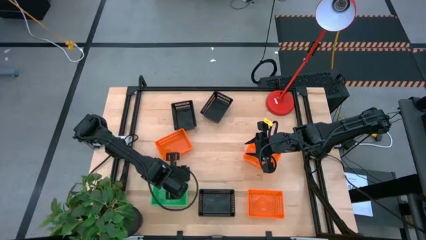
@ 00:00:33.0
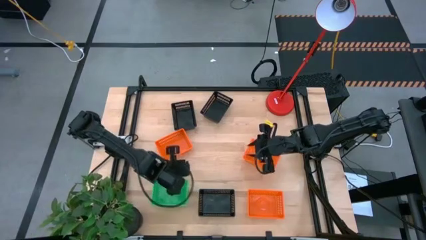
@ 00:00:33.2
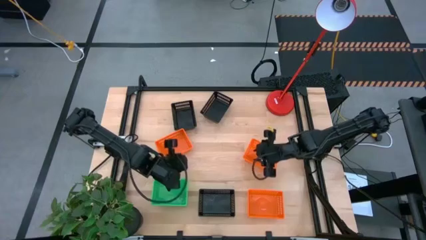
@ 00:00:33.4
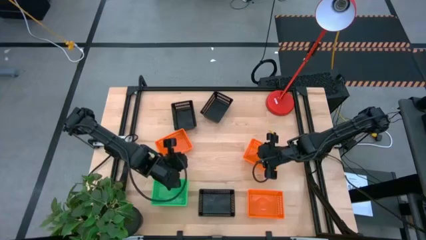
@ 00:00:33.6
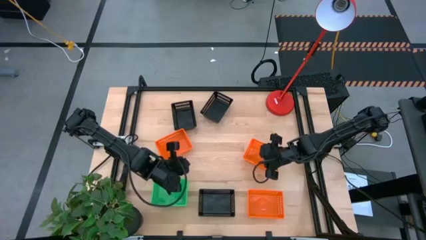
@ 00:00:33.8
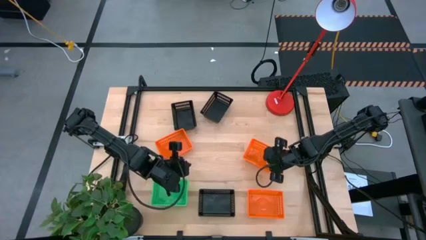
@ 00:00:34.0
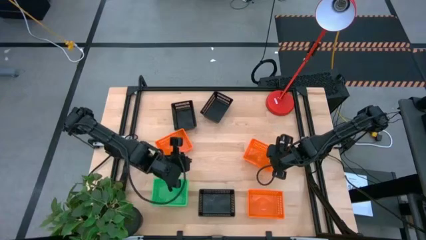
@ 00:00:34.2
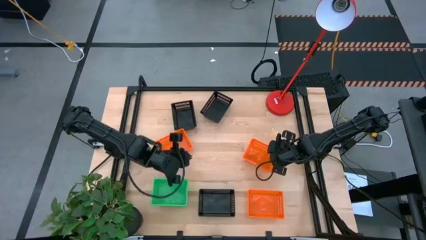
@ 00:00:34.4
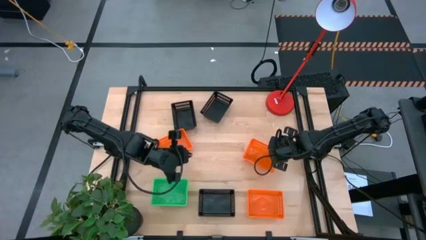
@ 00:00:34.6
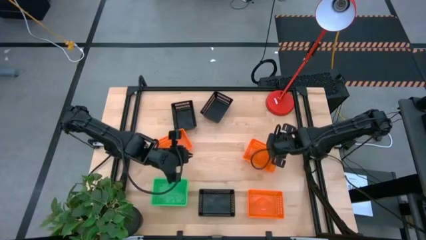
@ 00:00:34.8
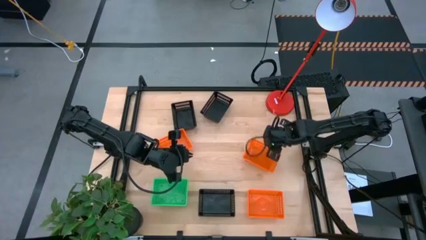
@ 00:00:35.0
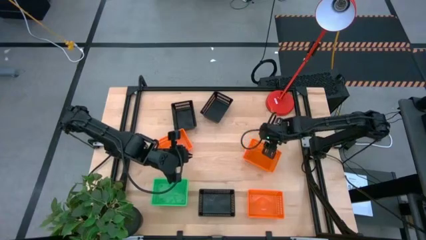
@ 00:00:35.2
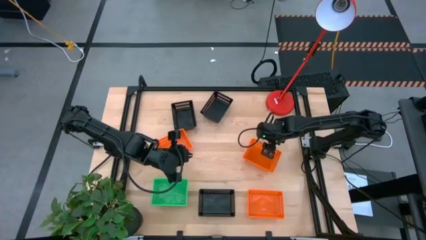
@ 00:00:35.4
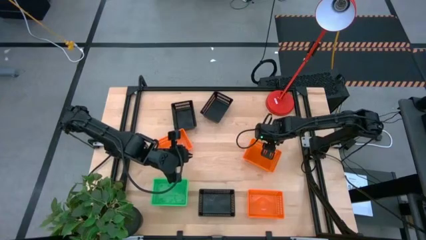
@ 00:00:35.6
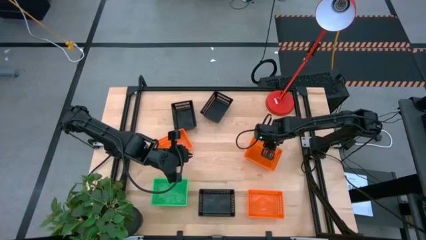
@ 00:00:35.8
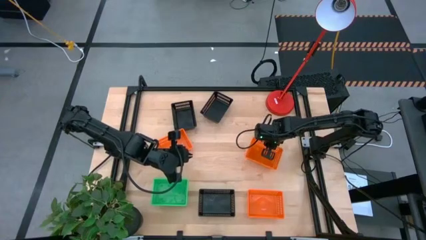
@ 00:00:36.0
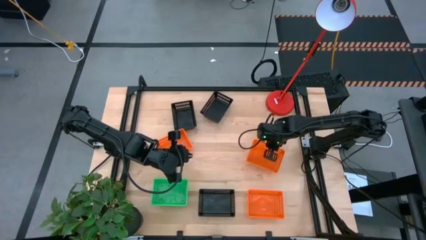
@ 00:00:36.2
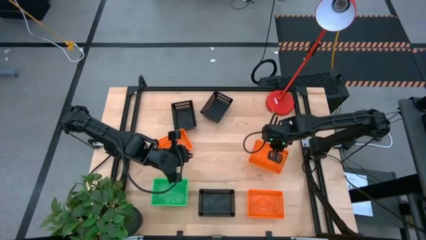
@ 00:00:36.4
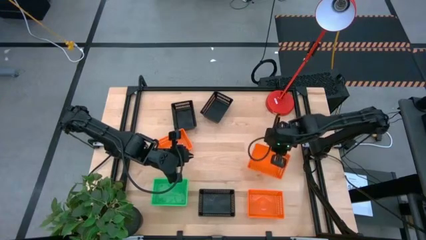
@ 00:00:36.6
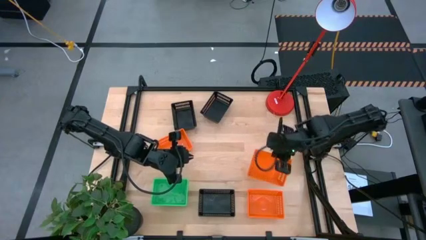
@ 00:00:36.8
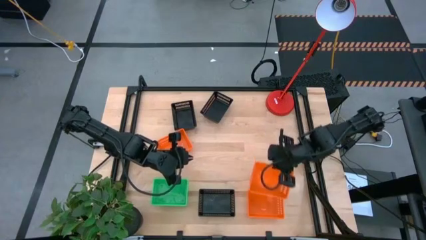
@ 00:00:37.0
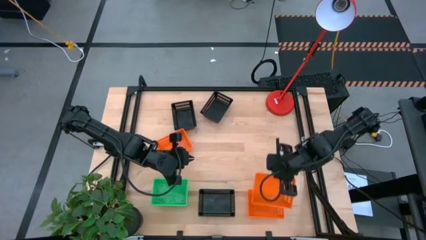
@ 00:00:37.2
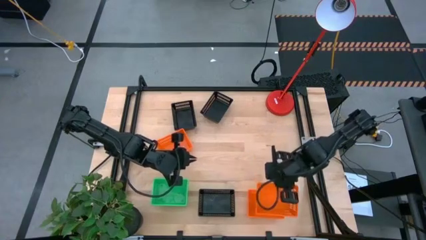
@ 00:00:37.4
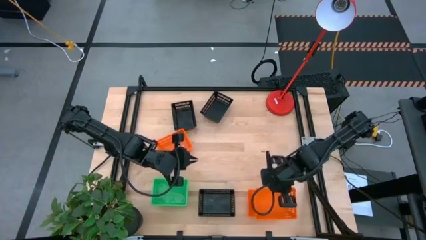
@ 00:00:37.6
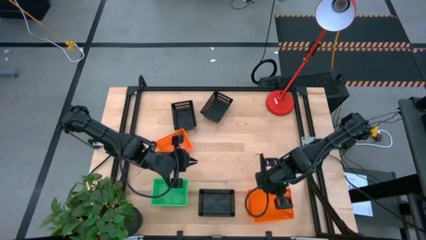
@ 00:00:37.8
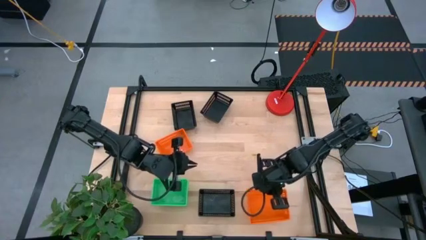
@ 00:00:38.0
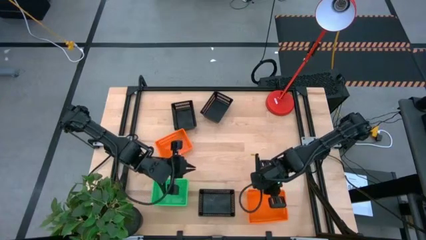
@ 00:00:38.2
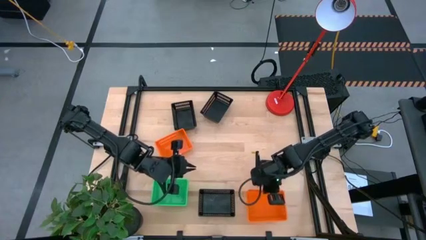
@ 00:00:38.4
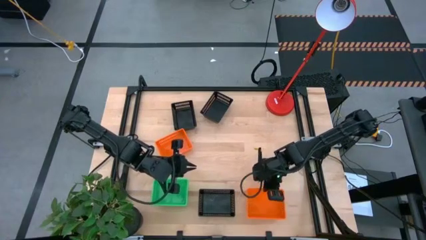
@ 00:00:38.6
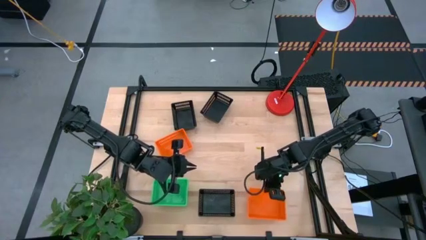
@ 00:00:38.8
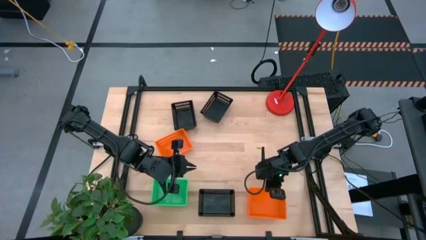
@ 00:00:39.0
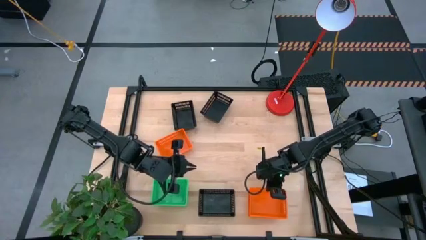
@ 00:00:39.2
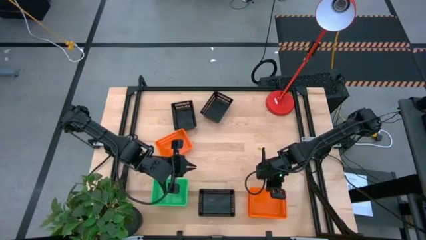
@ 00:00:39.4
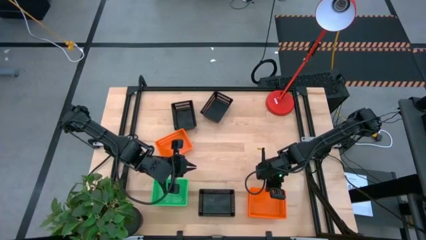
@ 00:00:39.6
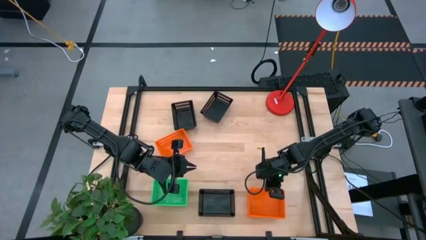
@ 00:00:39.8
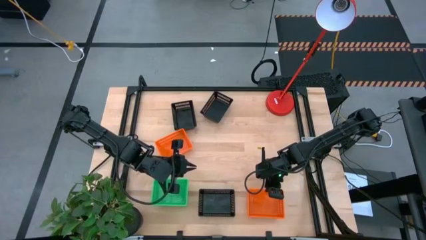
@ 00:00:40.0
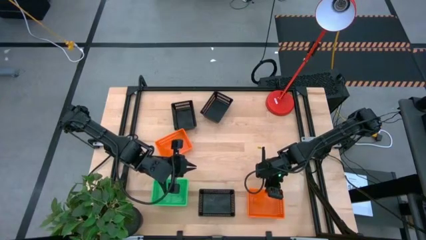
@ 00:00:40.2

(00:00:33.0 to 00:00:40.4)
Stack the top right orange bin on top of the bottom orange bin

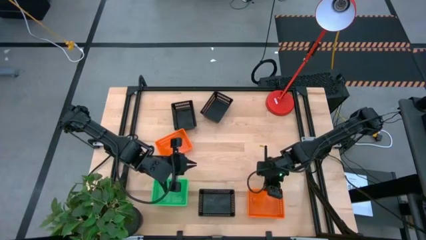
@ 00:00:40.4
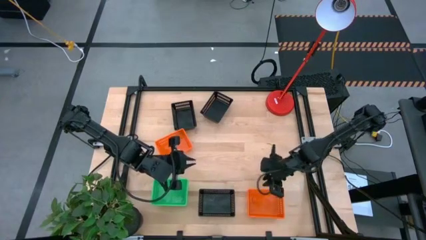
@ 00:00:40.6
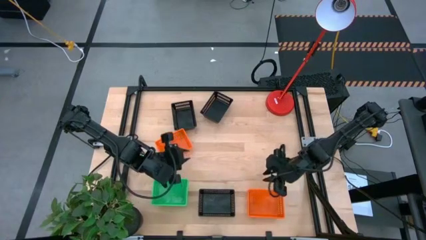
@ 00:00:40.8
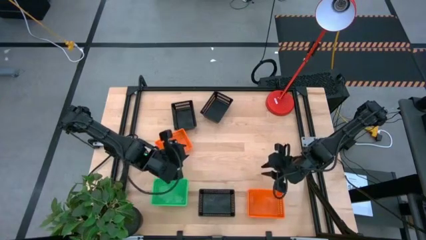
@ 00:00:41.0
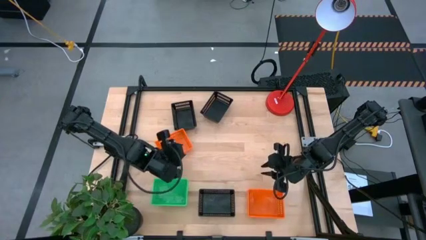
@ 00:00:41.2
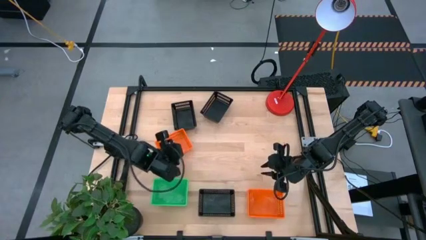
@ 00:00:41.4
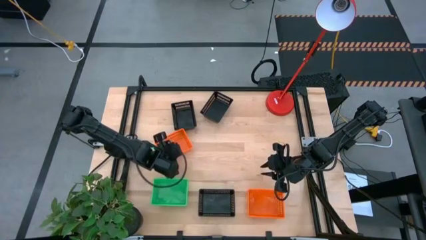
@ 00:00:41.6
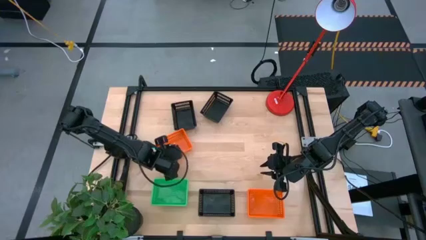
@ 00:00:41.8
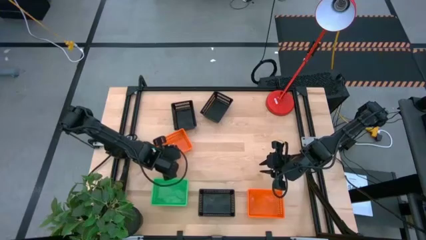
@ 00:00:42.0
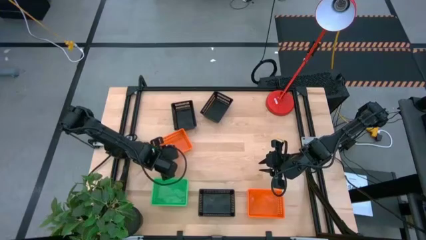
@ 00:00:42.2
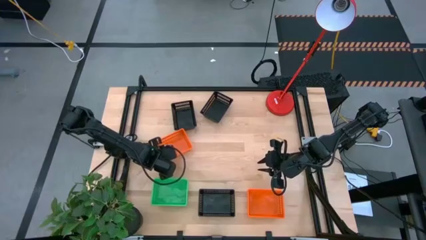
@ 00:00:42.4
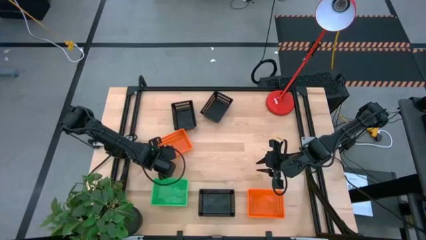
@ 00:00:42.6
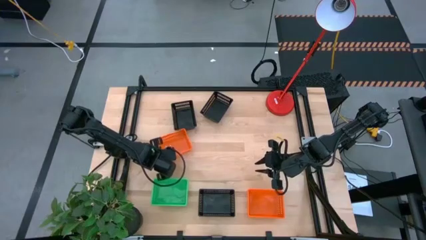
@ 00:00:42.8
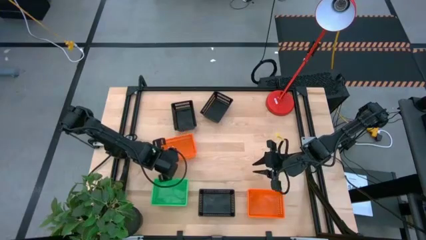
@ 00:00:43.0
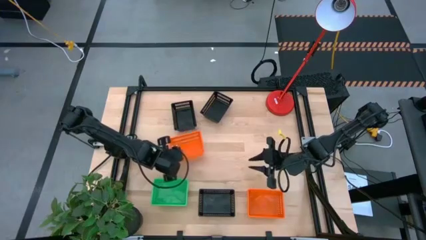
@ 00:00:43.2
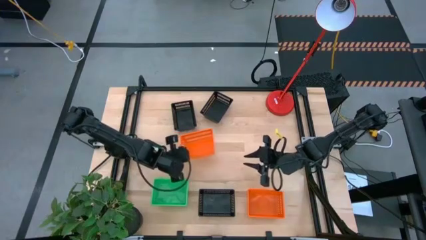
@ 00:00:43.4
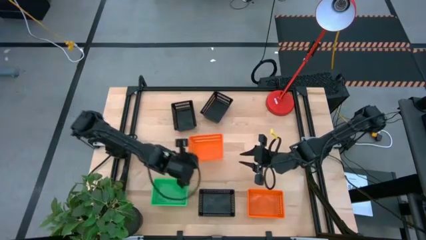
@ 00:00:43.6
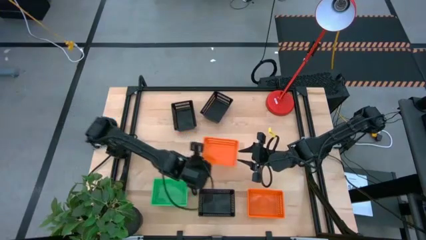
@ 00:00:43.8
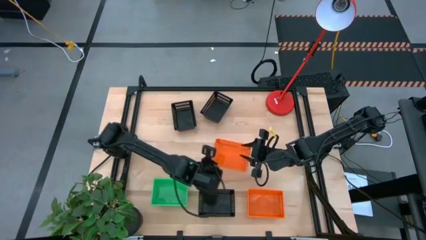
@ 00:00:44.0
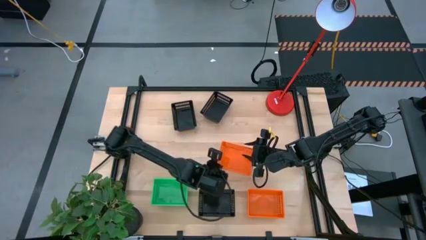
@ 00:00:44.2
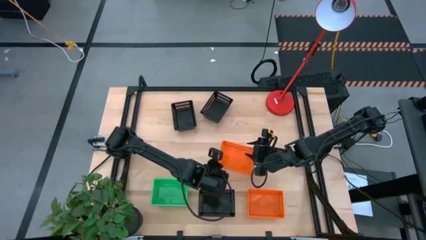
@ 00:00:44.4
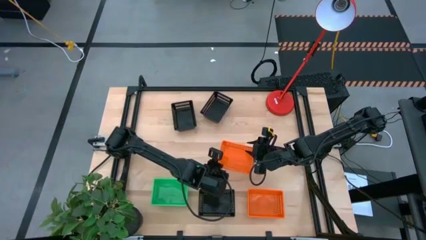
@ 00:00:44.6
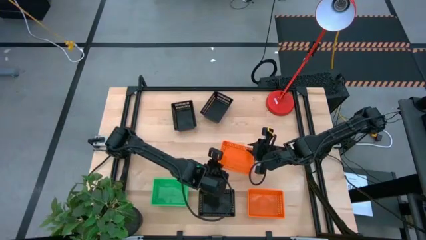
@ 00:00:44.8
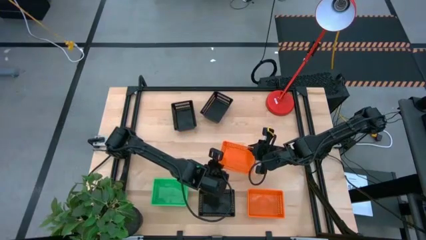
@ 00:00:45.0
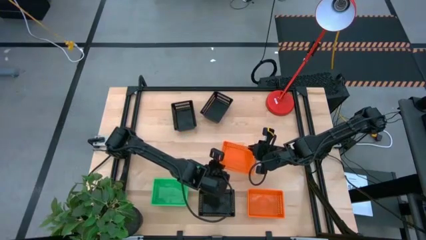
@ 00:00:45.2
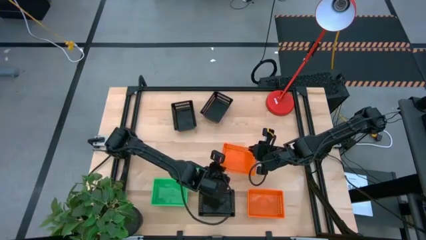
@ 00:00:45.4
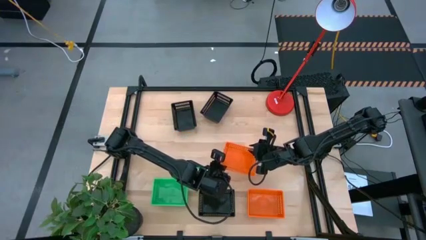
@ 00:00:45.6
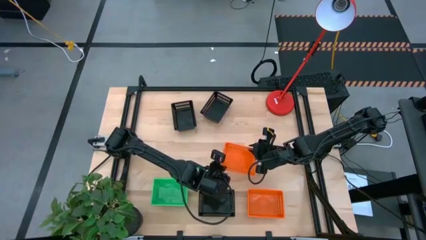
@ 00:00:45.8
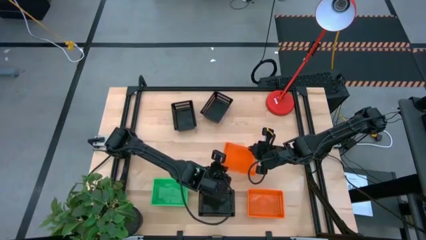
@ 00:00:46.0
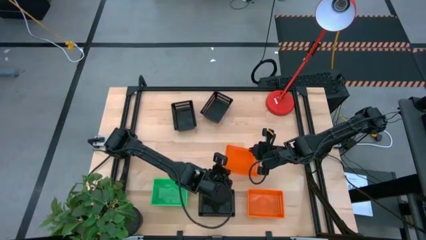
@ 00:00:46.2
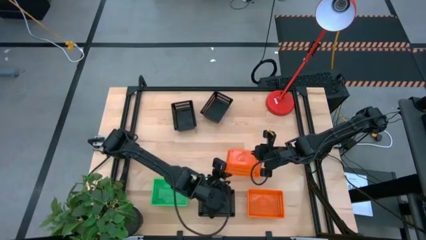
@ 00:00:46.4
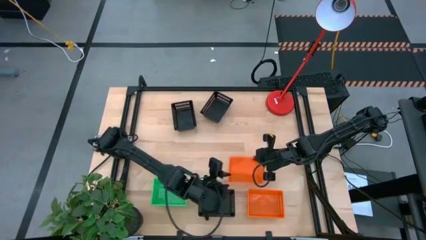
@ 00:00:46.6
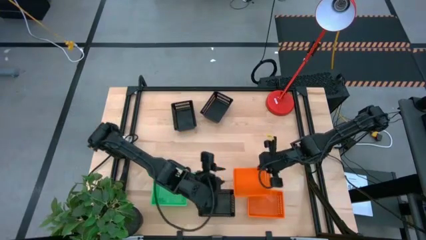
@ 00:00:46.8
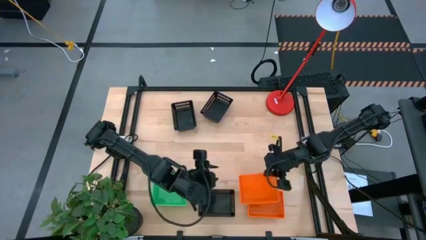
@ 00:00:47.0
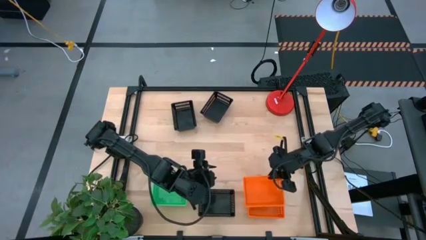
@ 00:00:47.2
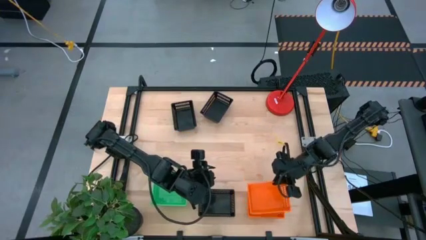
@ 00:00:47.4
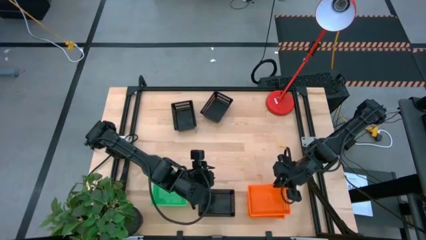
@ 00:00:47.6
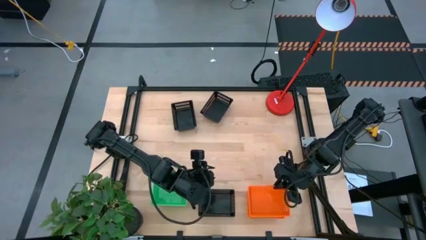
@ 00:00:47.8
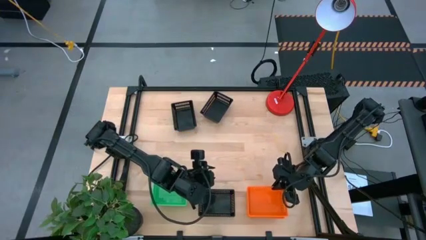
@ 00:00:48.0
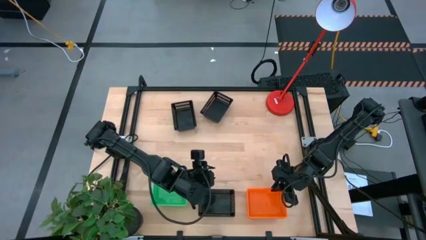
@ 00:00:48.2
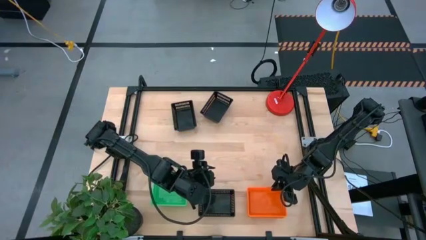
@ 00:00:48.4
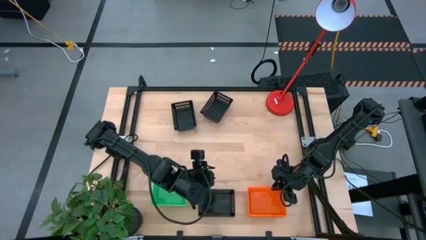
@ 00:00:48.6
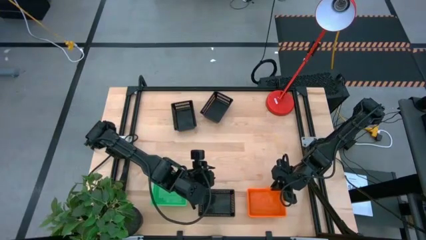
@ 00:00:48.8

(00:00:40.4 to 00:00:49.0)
Stack the left orange bin on top of the right orange bin
